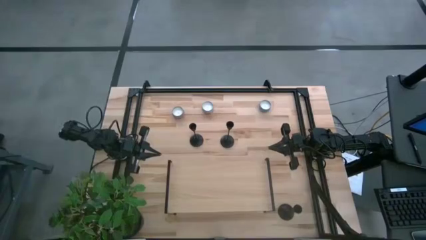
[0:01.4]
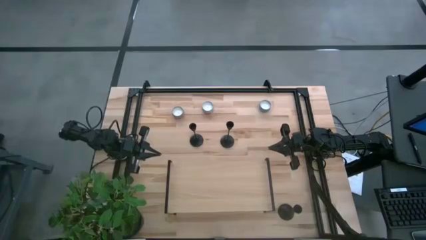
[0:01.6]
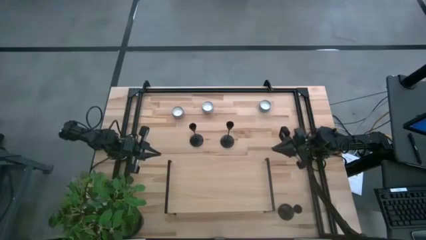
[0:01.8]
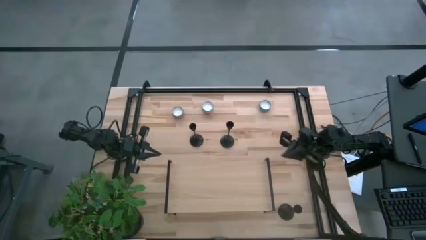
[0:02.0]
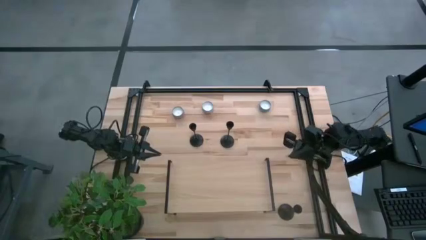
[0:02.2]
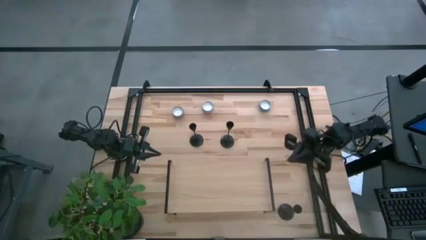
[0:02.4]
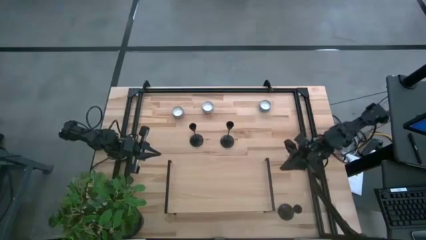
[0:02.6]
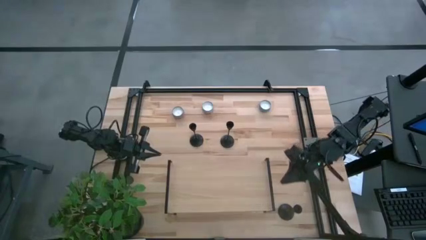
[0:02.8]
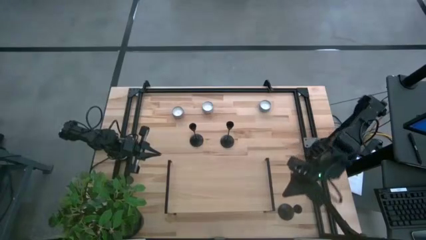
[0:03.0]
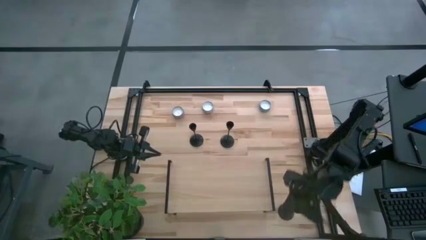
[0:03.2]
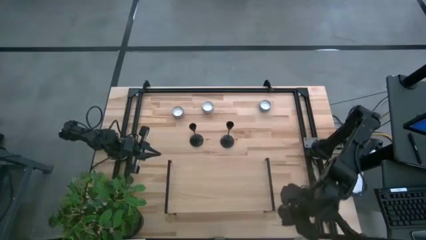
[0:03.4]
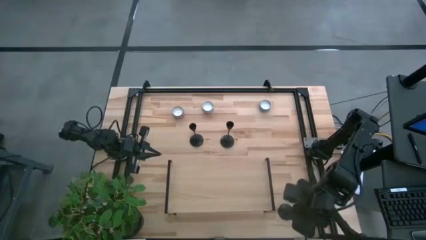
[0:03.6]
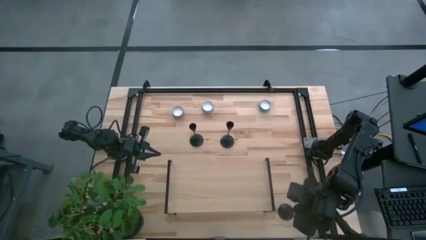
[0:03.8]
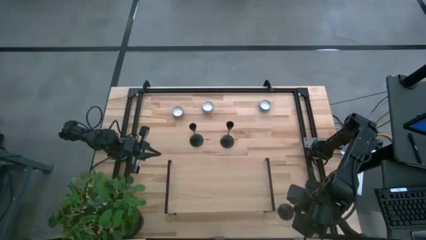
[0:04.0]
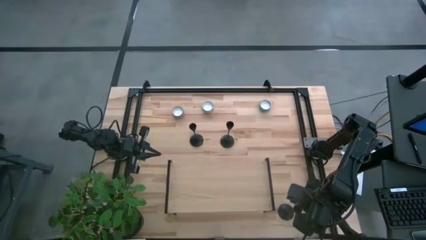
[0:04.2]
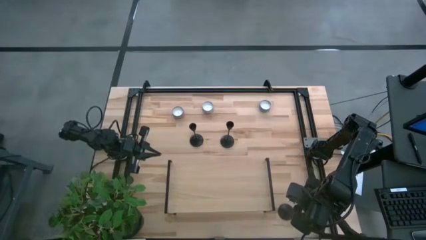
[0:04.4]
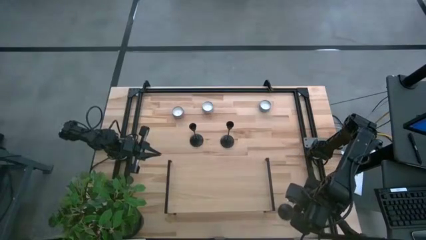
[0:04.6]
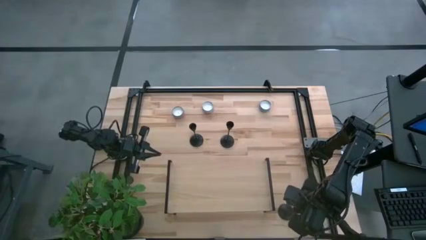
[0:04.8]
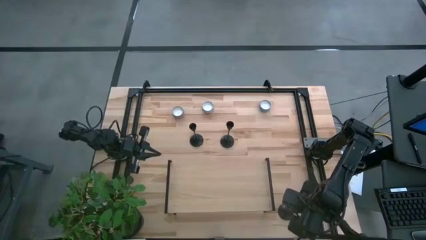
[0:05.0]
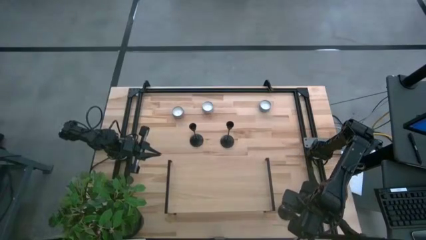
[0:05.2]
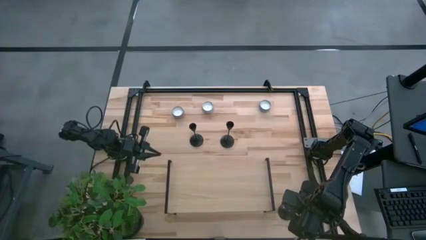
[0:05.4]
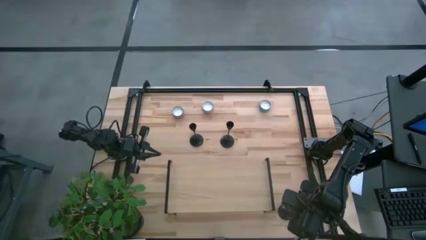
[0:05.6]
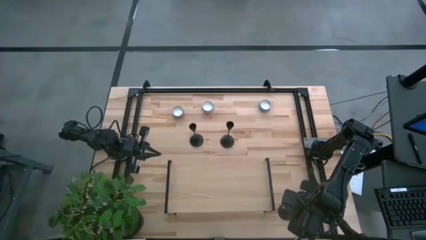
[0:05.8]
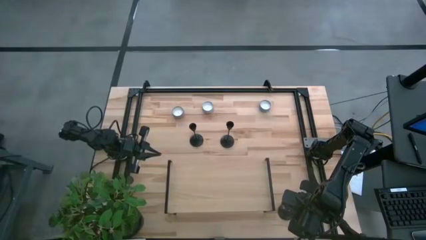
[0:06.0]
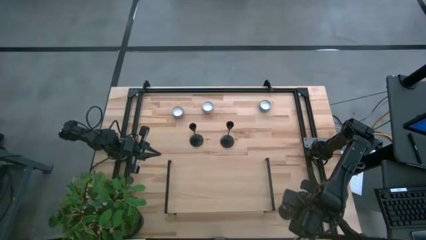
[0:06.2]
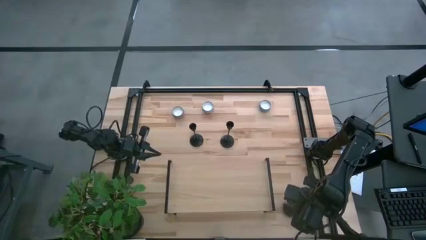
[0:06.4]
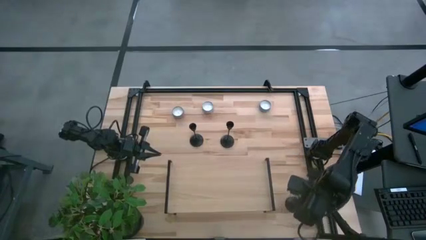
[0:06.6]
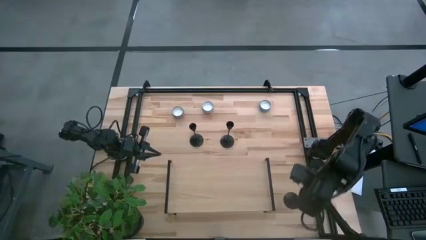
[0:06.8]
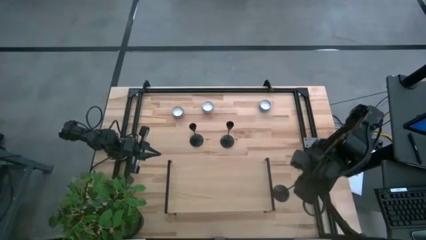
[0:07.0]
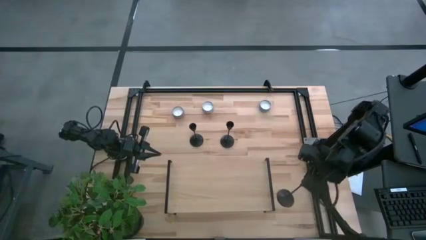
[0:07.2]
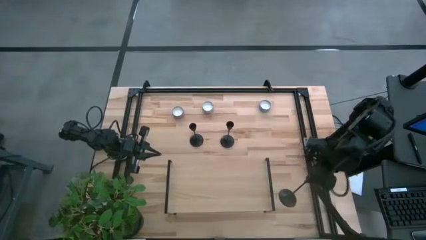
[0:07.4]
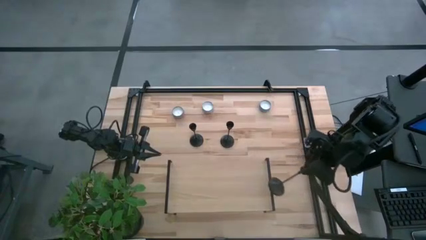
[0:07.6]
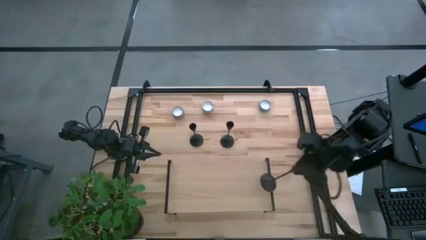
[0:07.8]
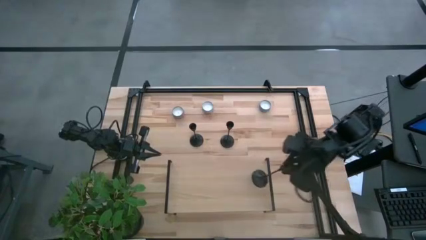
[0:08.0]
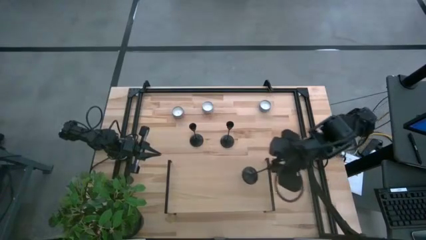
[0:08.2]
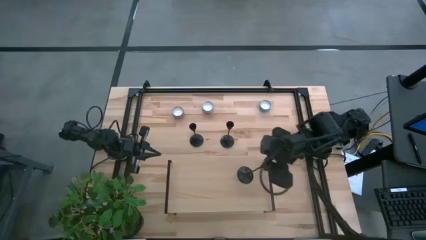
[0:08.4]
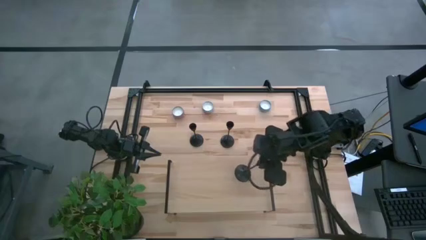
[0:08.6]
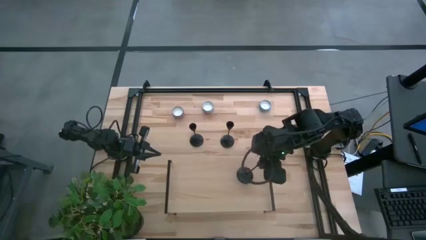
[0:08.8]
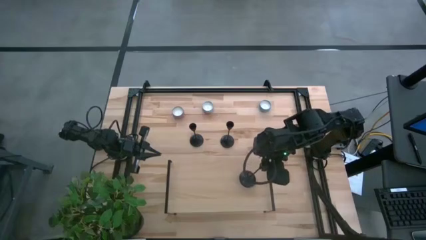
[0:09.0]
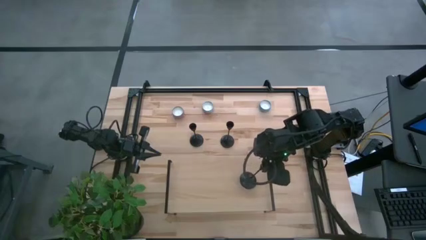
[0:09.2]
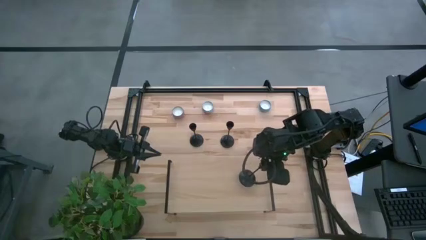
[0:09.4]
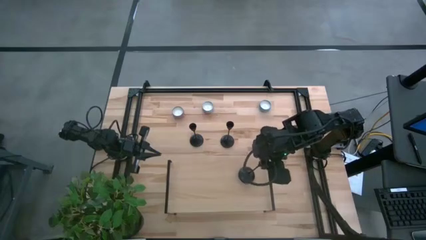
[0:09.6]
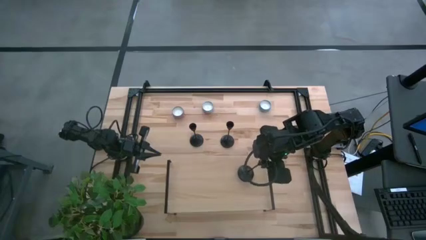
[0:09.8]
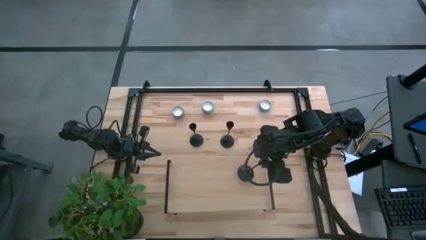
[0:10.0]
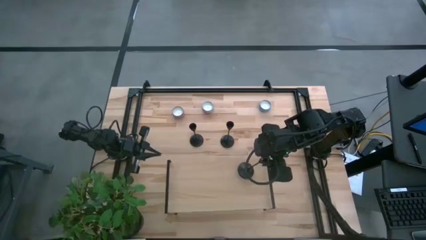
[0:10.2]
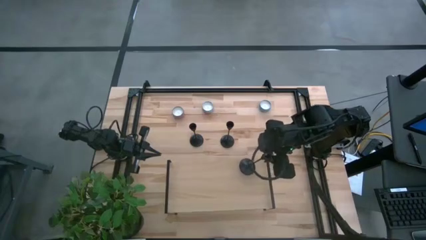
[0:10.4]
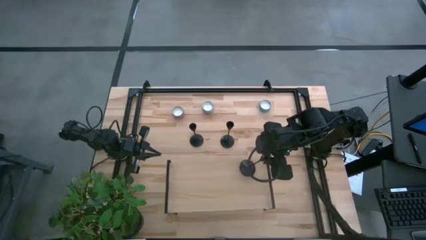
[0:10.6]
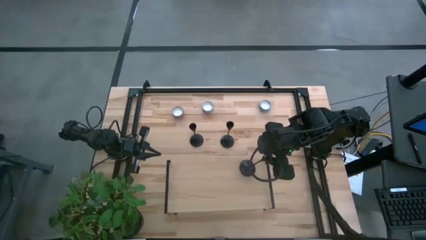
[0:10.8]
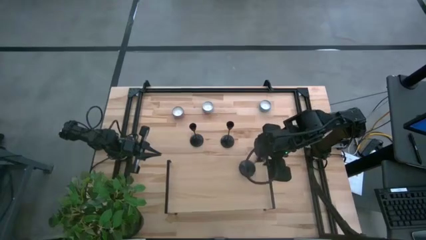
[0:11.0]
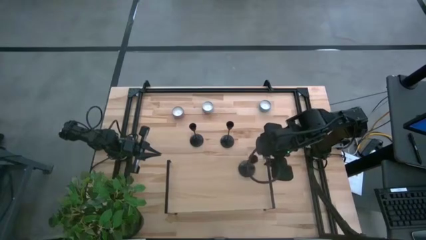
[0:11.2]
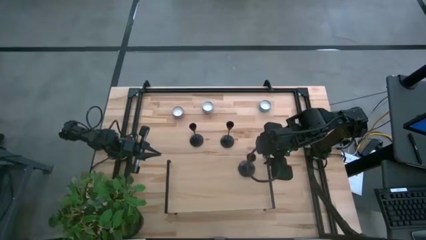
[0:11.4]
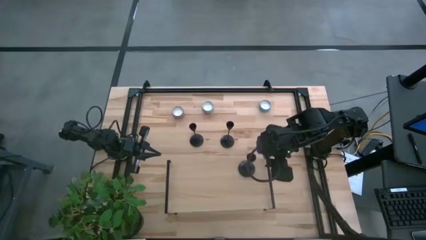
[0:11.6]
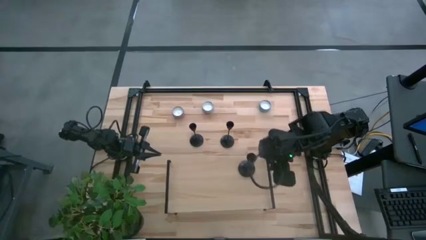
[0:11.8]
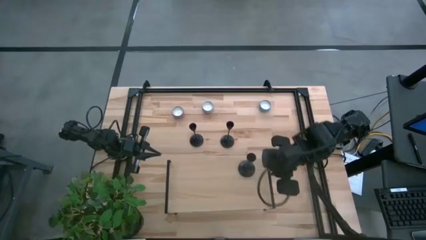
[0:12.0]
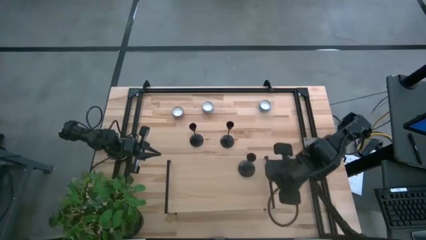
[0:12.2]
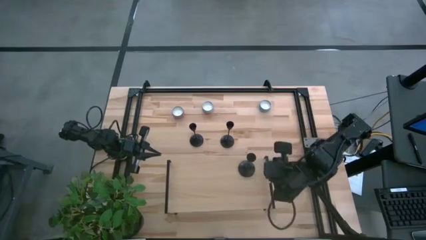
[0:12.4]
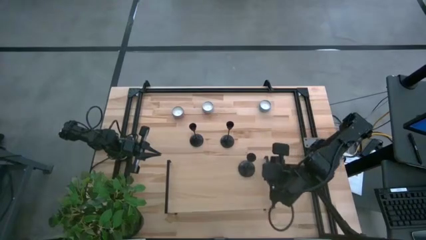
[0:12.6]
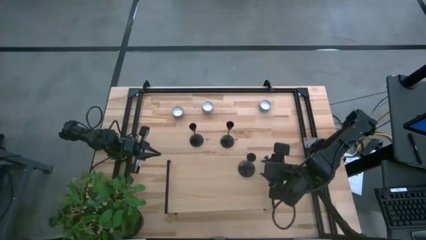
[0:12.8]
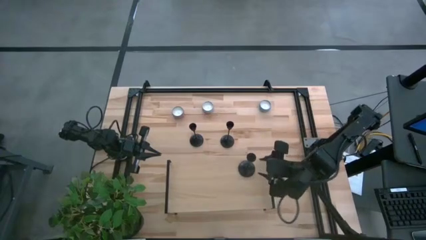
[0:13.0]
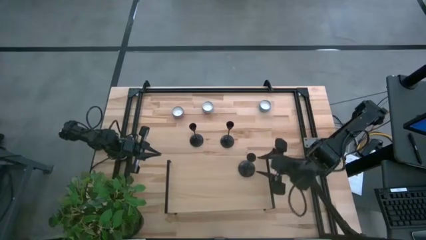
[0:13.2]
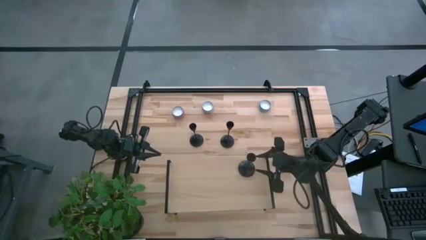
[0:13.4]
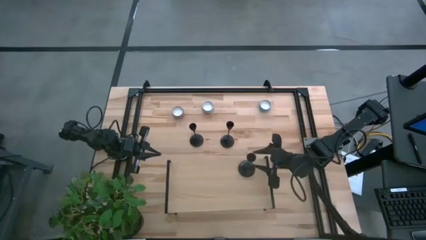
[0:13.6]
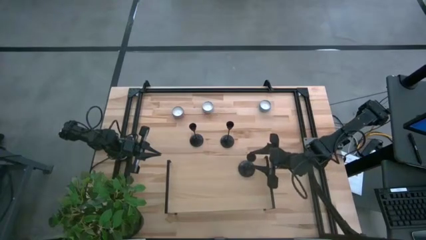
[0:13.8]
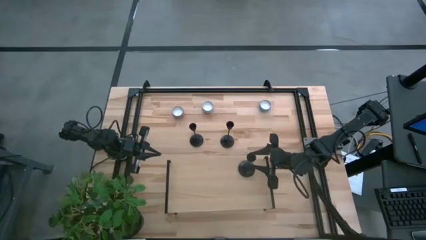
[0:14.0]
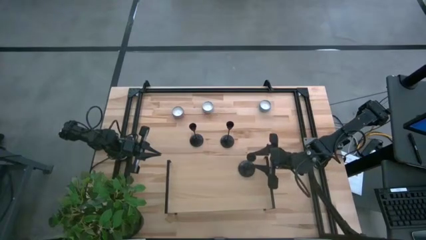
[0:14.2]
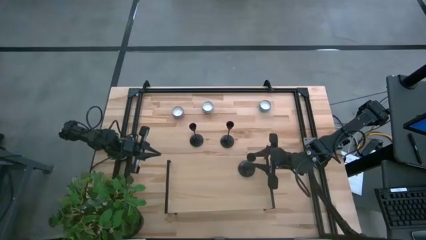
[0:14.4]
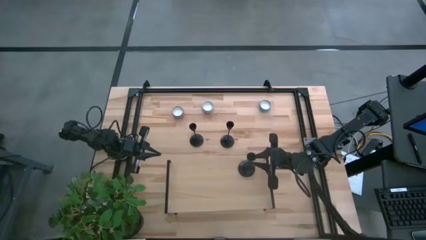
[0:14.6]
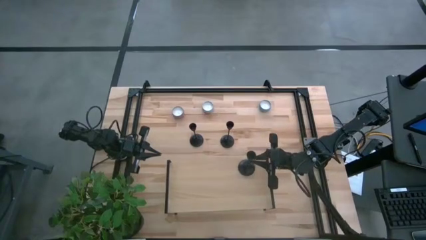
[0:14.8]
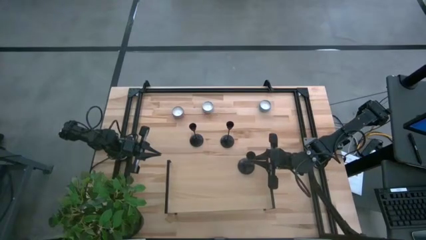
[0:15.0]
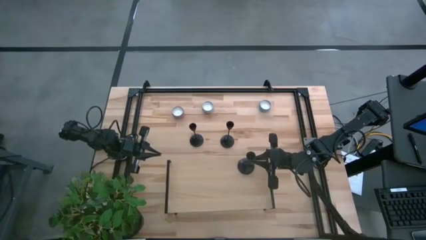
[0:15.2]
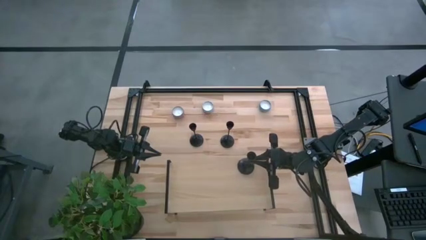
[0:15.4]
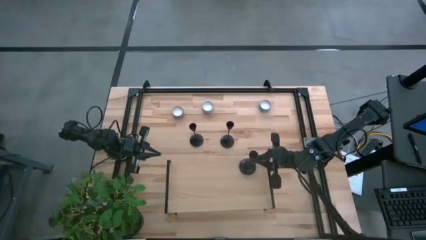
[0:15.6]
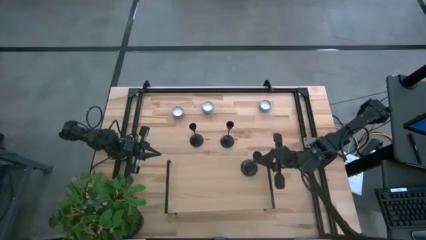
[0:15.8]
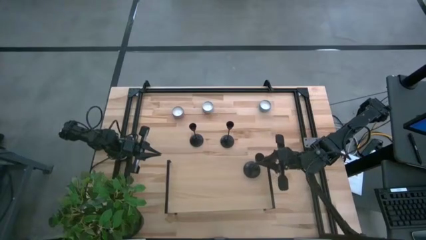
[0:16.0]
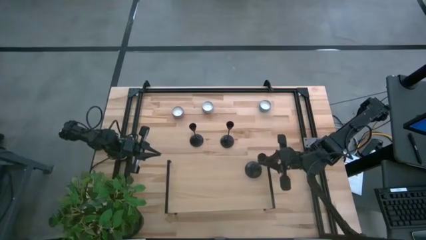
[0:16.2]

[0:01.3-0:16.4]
Task: Pick & Place candle stick holders
Put the bottom candle holder on the shelf
